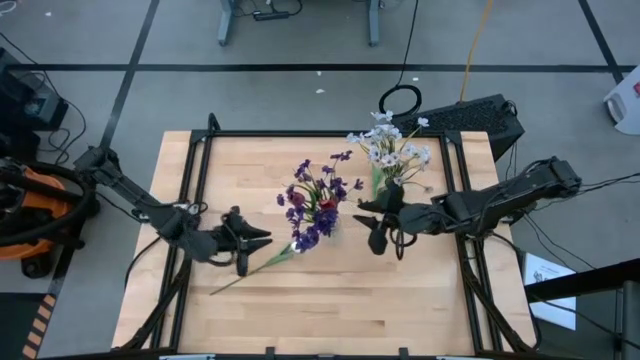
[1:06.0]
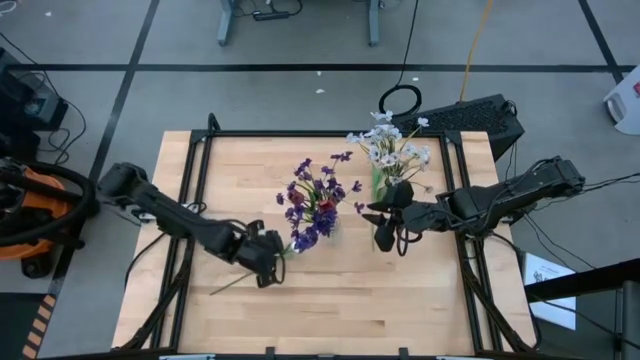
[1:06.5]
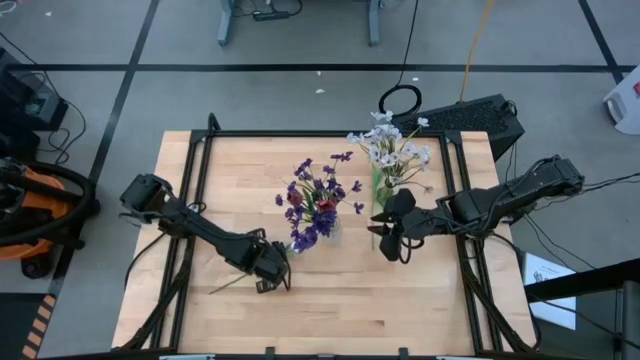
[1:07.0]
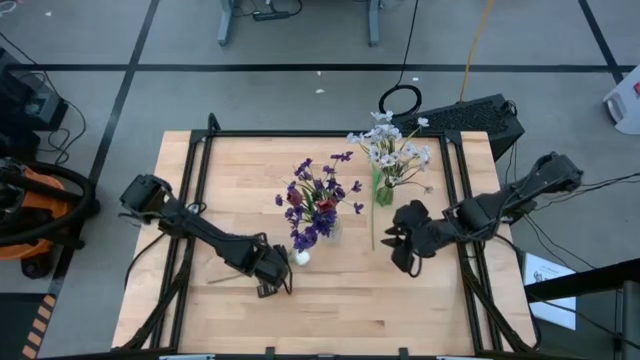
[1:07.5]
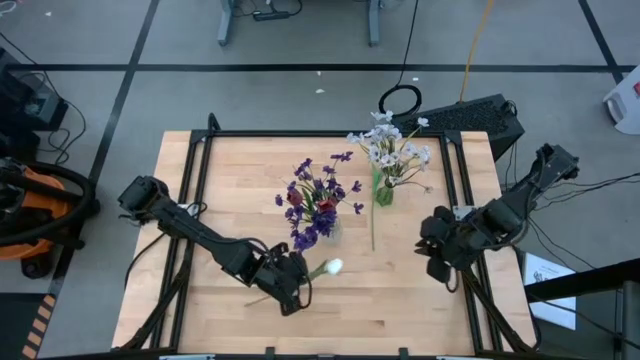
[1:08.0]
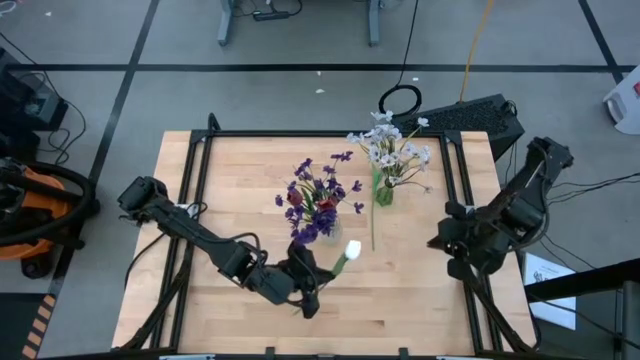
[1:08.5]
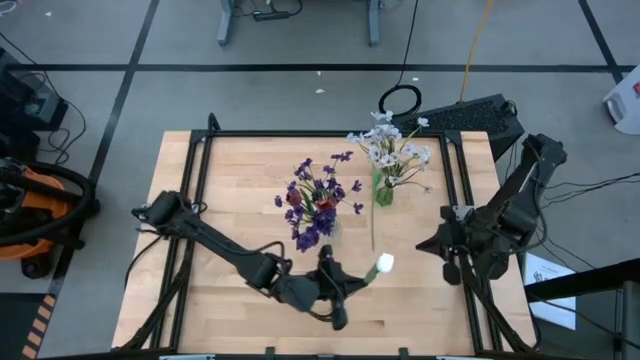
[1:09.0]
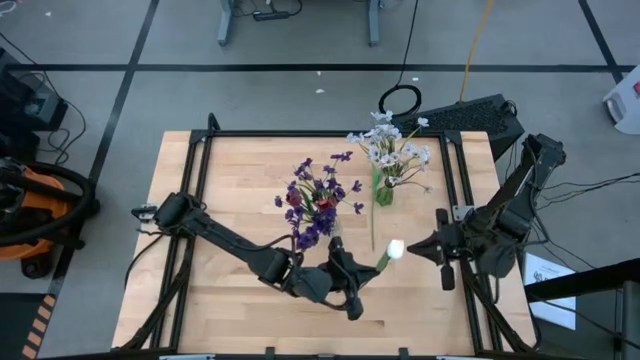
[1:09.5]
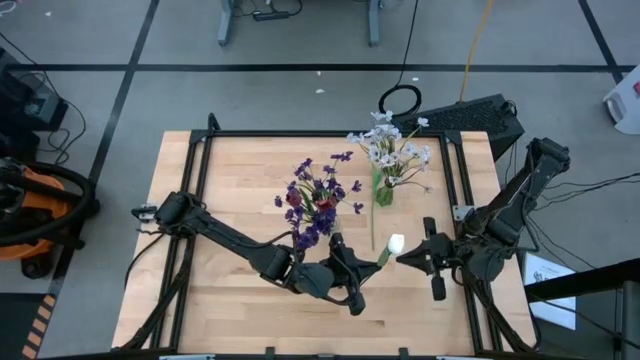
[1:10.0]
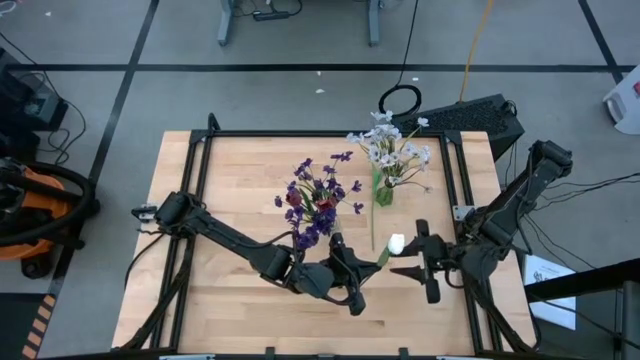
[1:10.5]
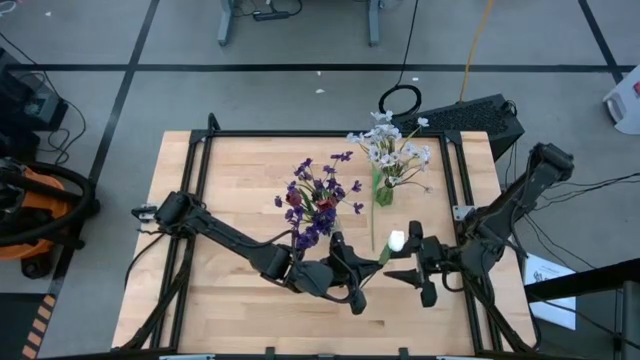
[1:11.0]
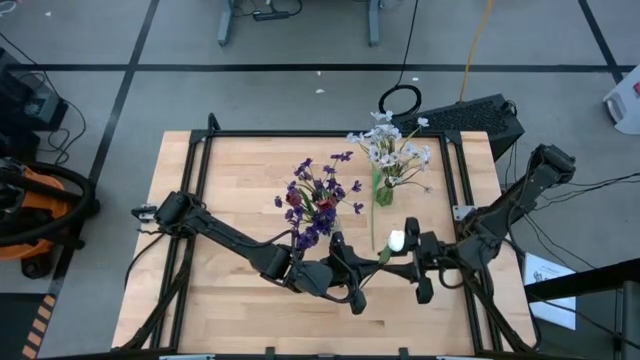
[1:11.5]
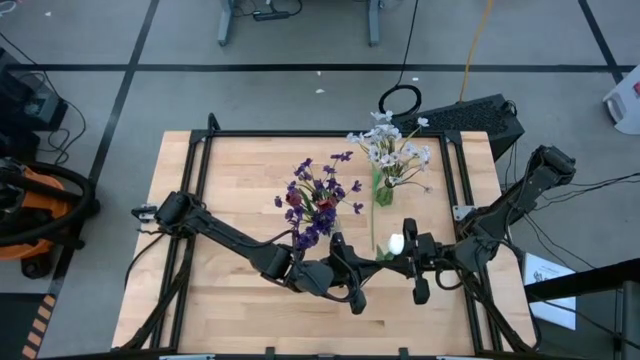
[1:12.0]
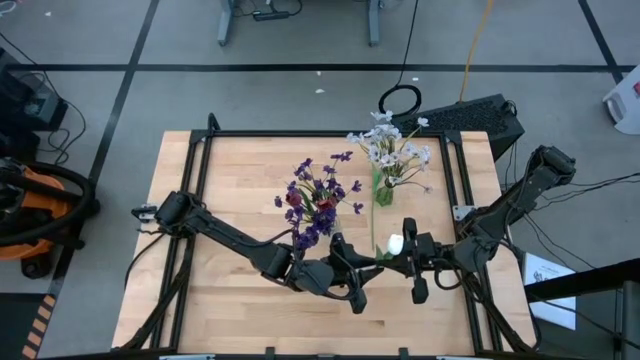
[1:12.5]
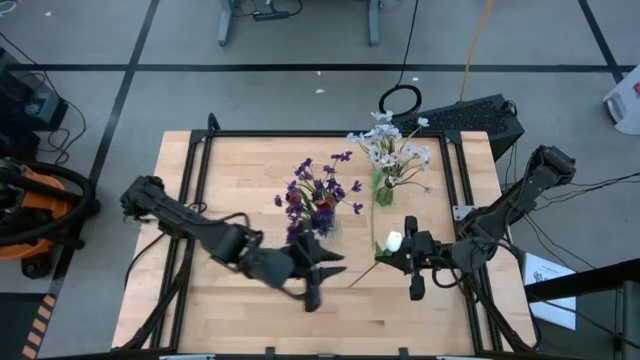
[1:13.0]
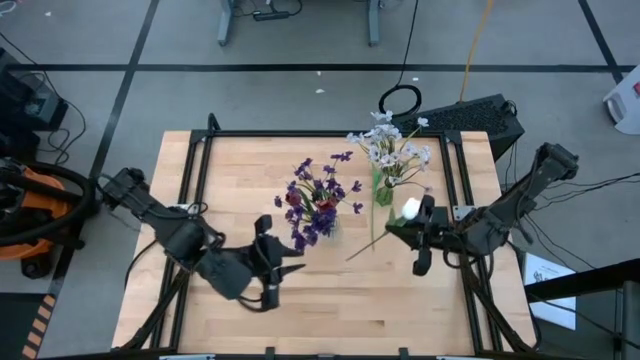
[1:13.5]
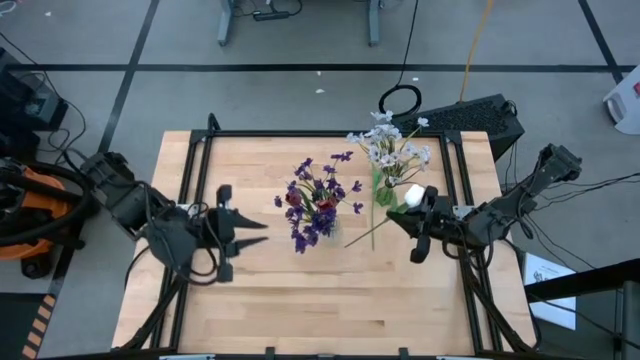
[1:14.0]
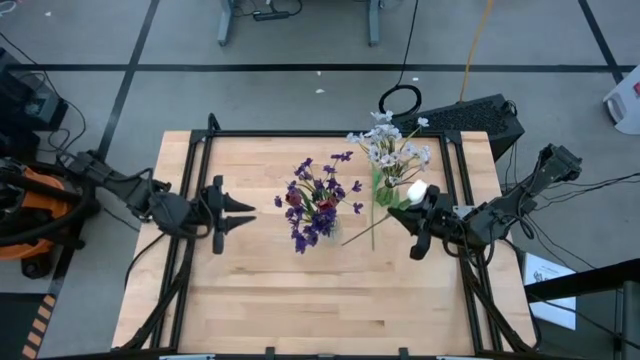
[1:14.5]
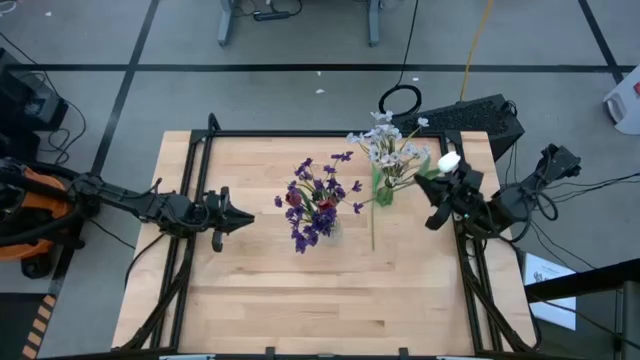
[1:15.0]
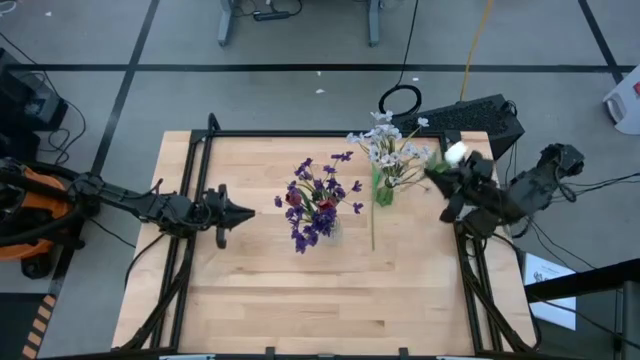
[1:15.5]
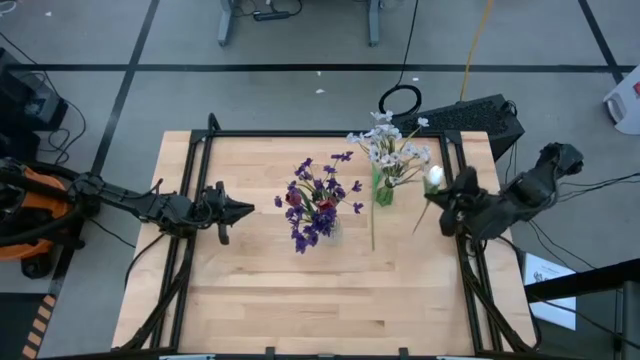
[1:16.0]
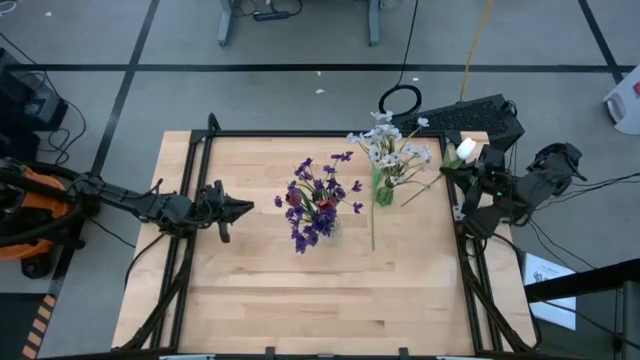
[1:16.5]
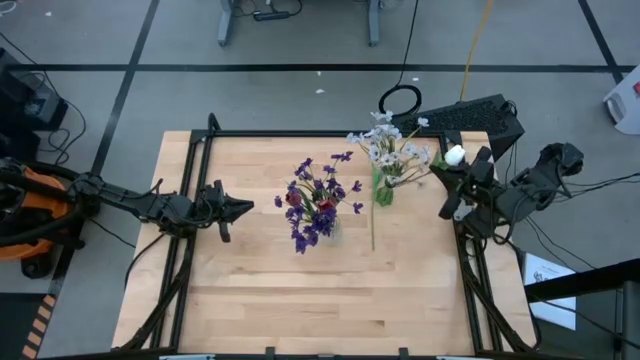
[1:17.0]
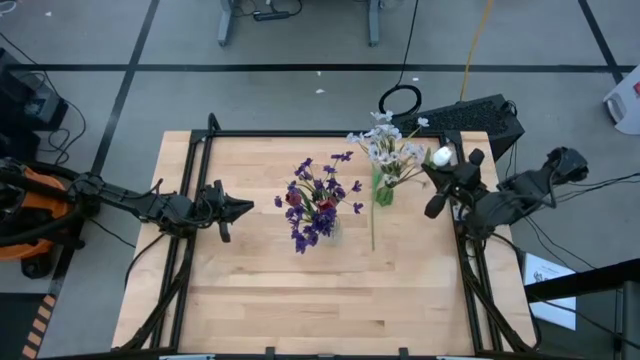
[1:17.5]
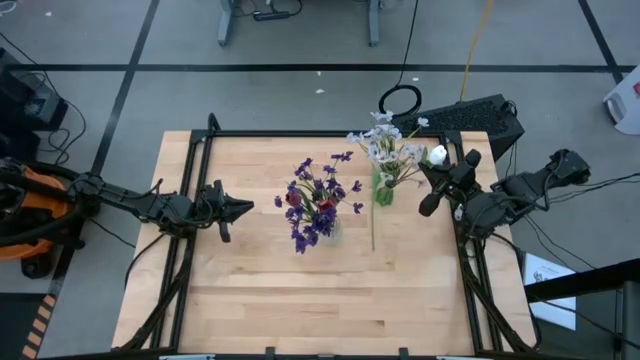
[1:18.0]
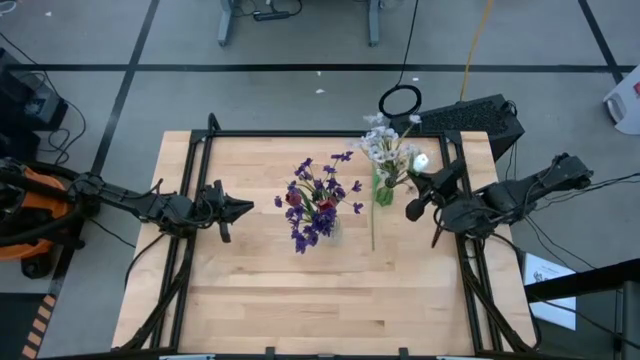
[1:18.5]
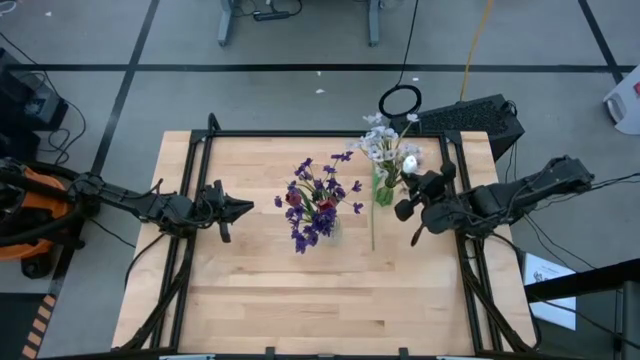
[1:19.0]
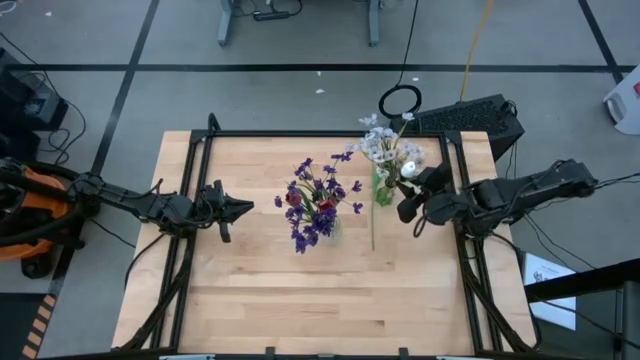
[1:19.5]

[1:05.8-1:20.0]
Task: Sort flowers into vase by color
Put the bottom white tulip into the transparent green vase

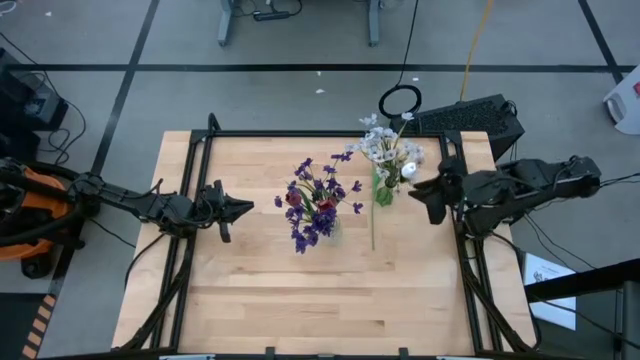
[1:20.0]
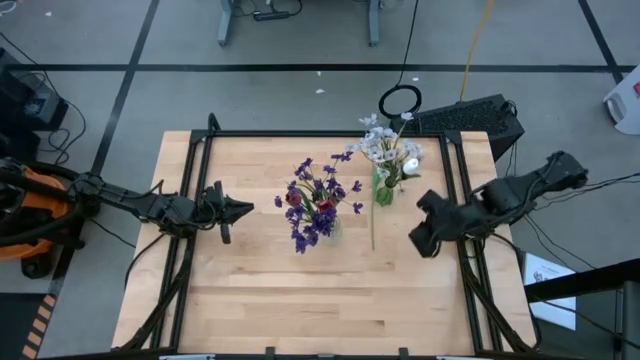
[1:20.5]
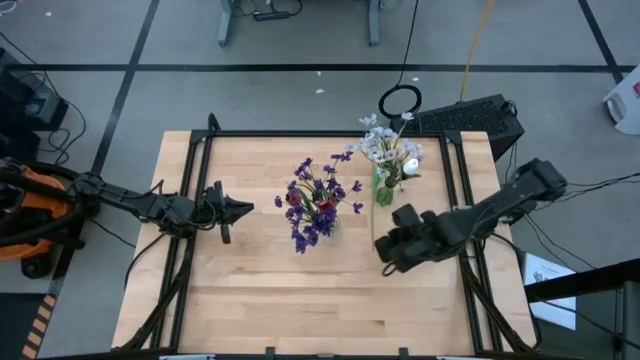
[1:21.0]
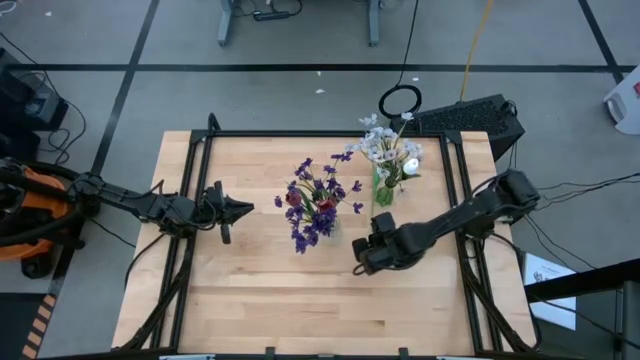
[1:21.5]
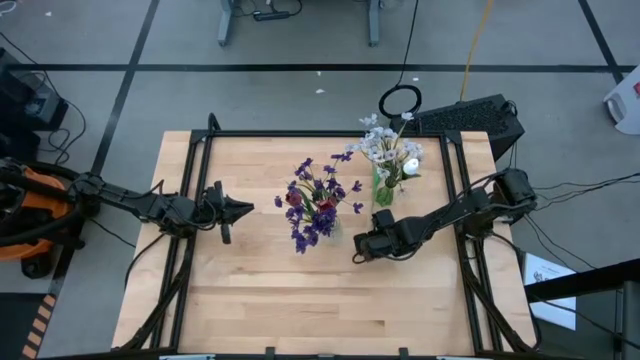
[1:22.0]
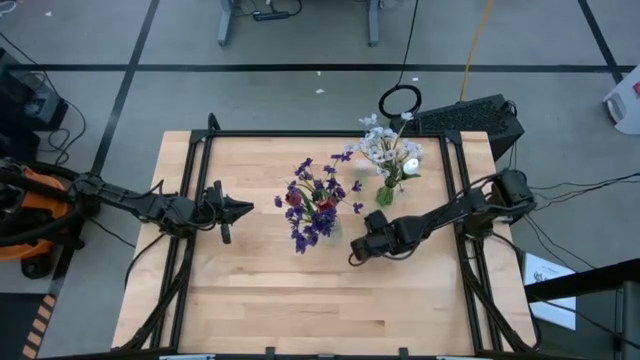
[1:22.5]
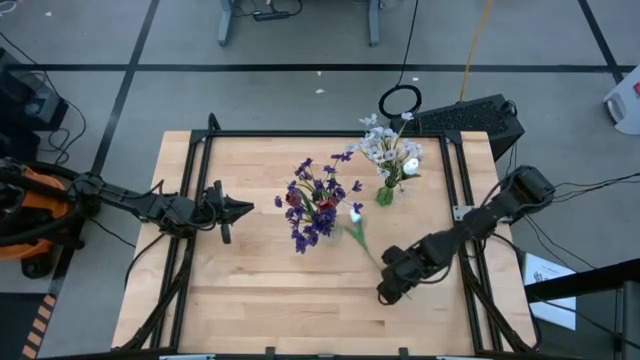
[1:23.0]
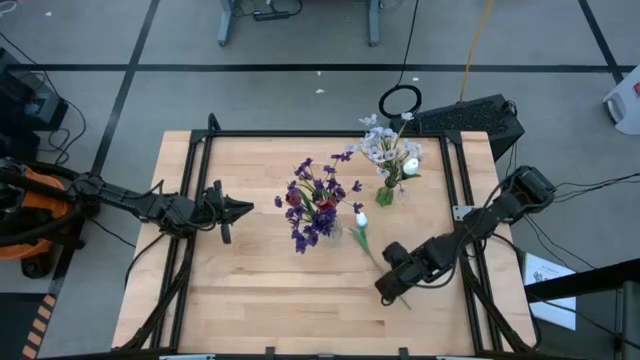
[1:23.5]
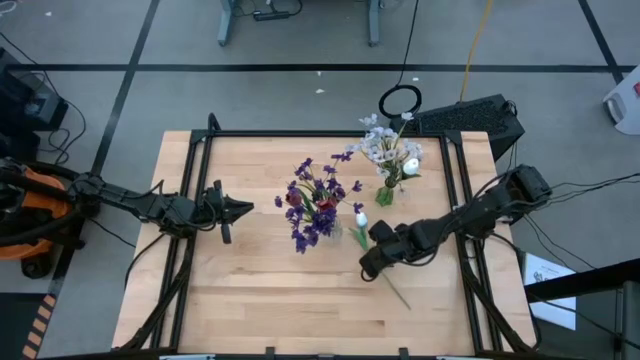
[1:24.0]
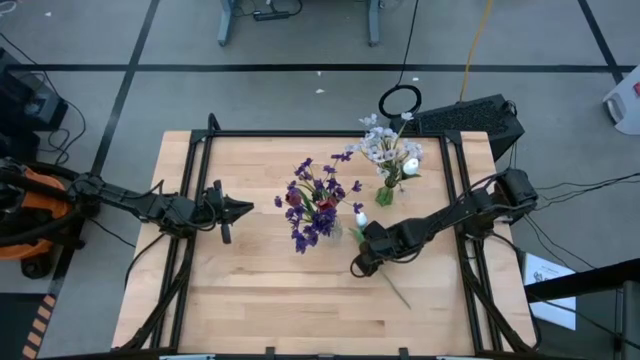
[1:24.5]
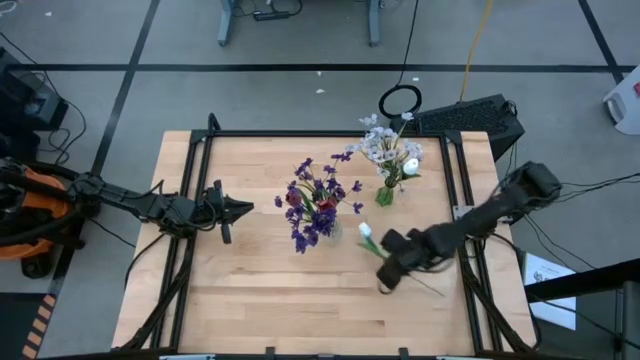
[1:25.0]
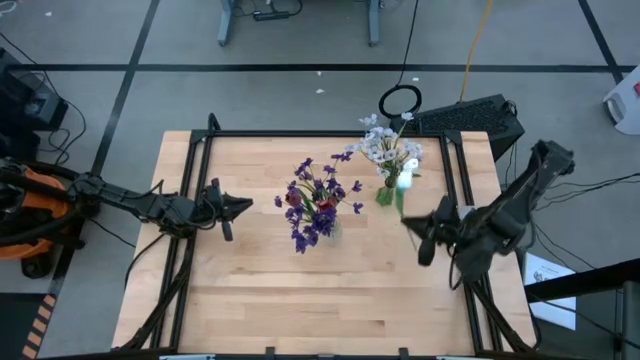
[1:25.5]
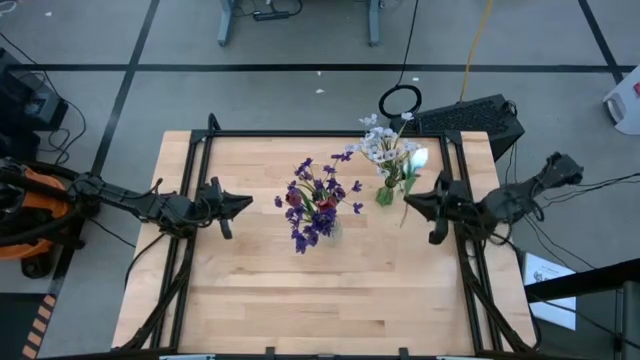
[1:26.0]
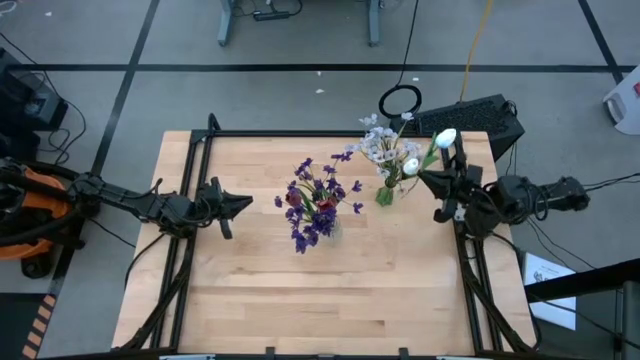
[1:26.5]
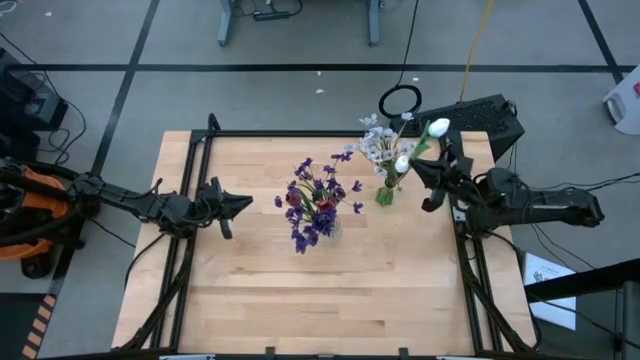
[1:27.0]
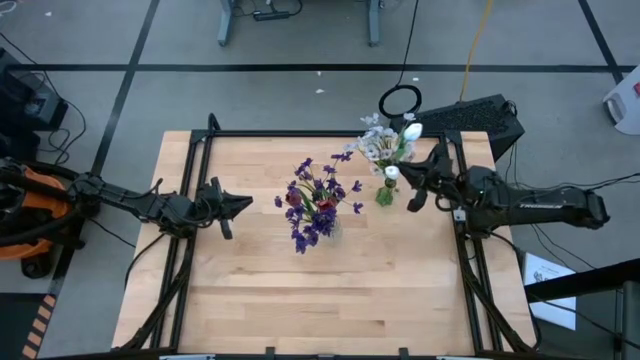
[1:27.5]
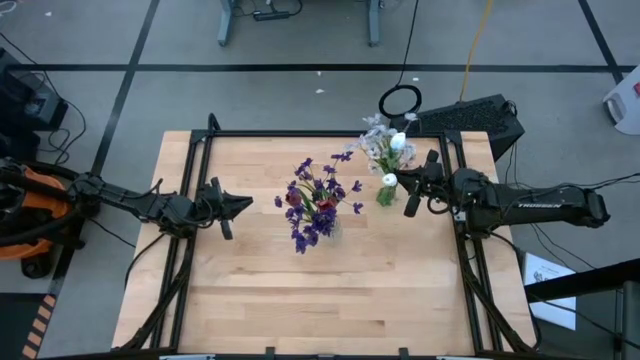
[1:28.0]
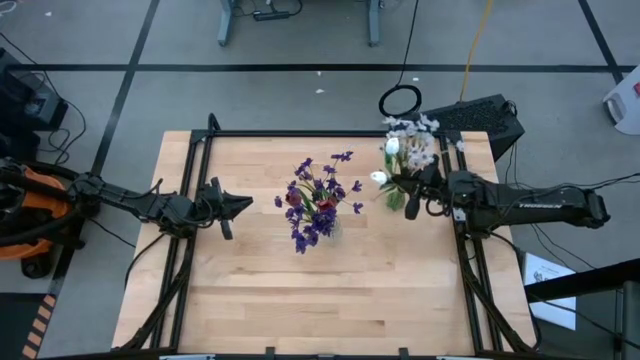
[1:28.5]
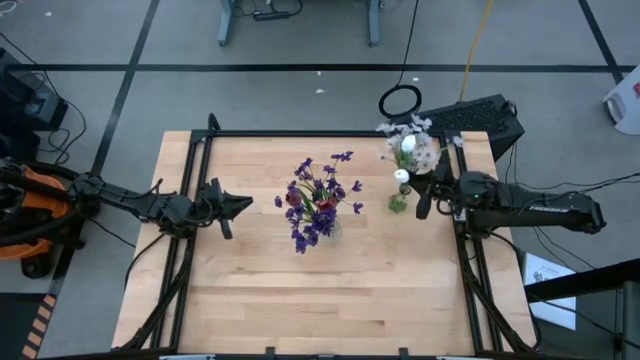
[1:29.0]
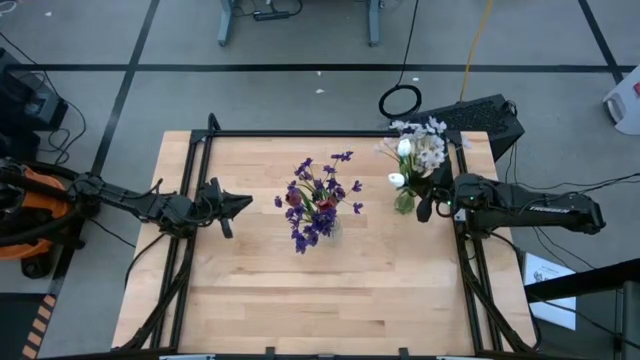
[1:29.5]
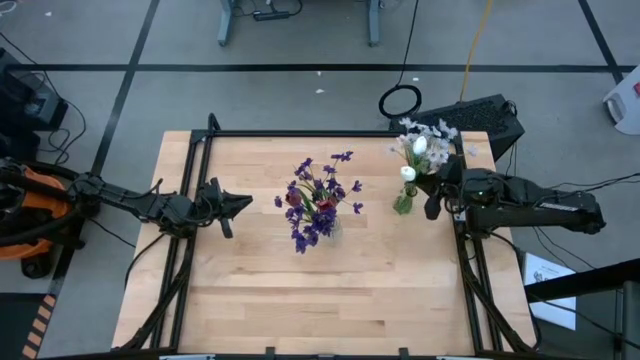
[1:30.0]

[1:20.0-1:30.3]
Put the white tulip into the transparent green vase
